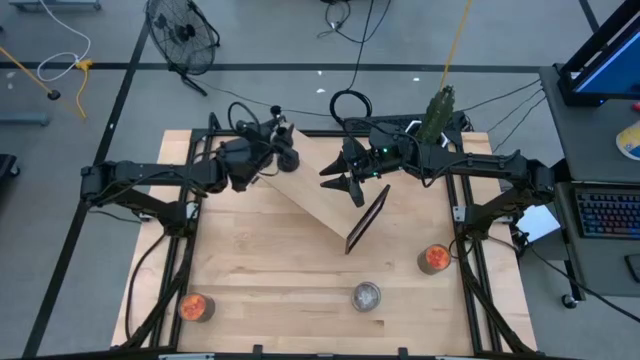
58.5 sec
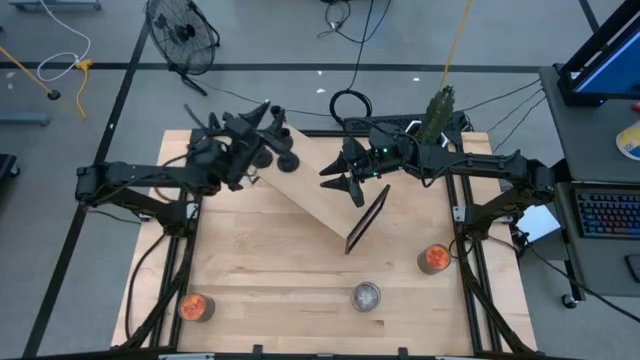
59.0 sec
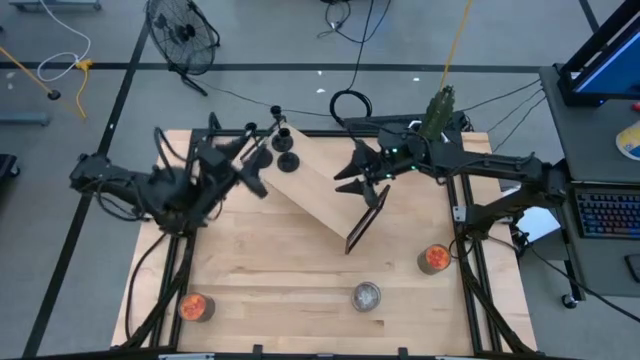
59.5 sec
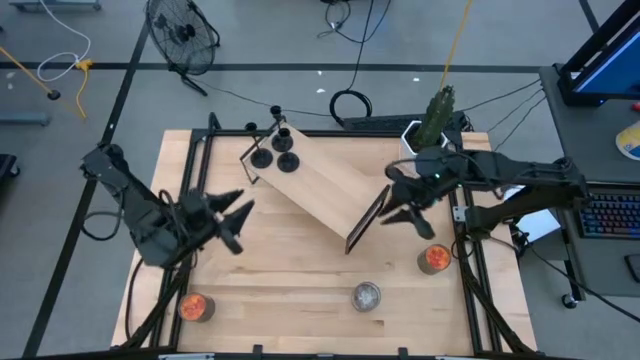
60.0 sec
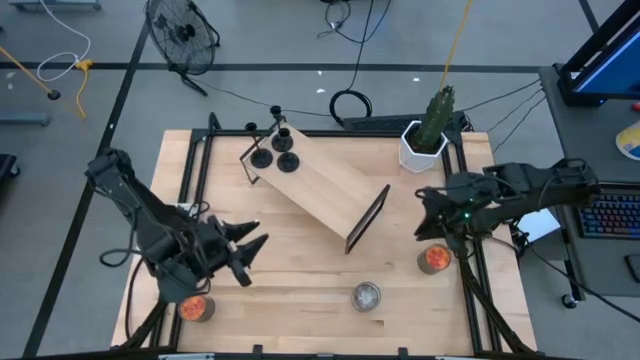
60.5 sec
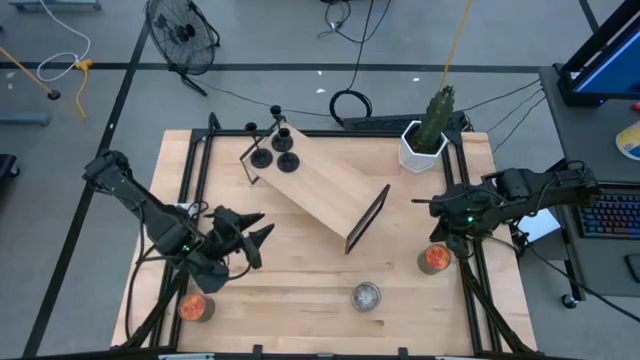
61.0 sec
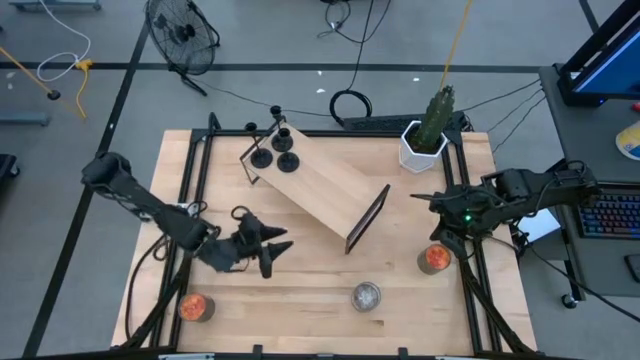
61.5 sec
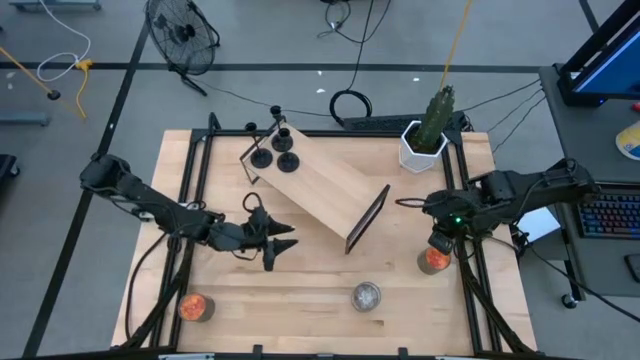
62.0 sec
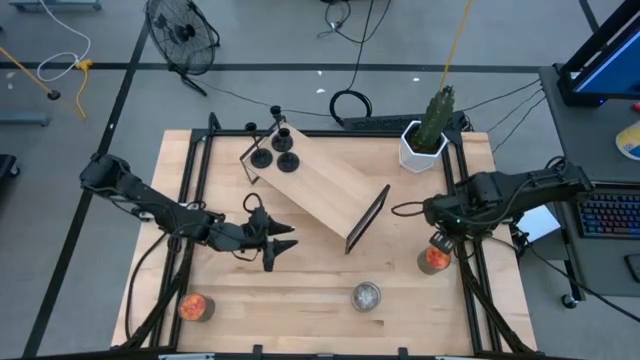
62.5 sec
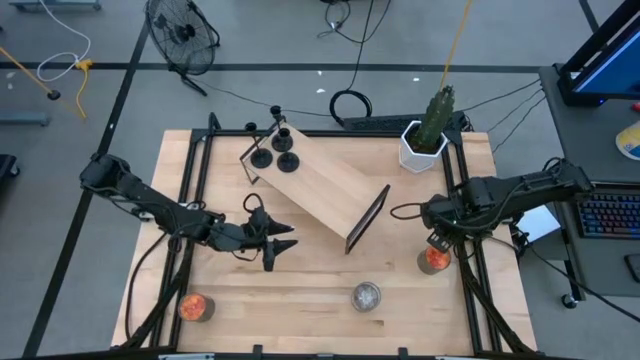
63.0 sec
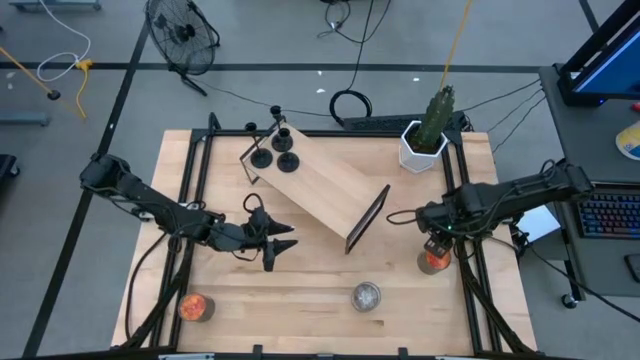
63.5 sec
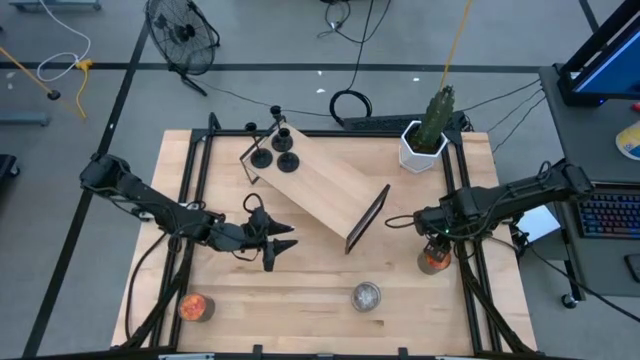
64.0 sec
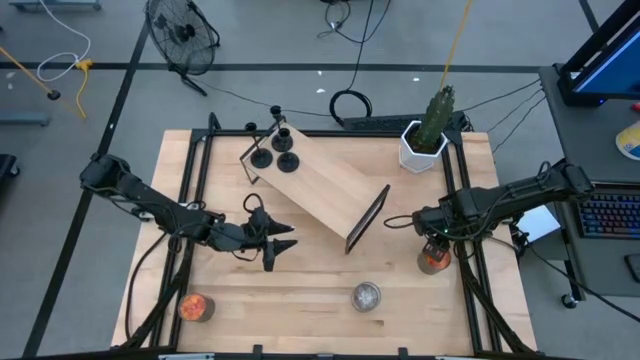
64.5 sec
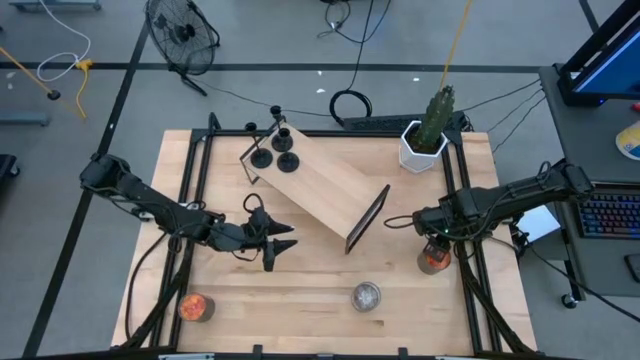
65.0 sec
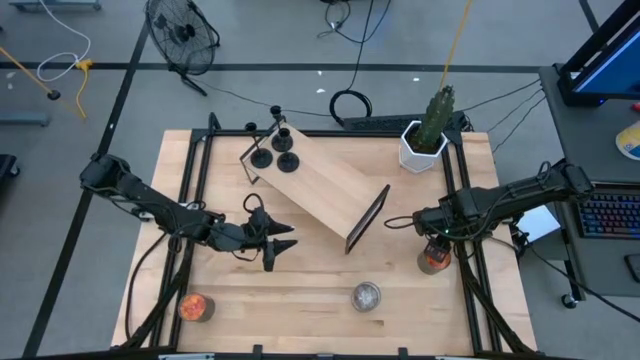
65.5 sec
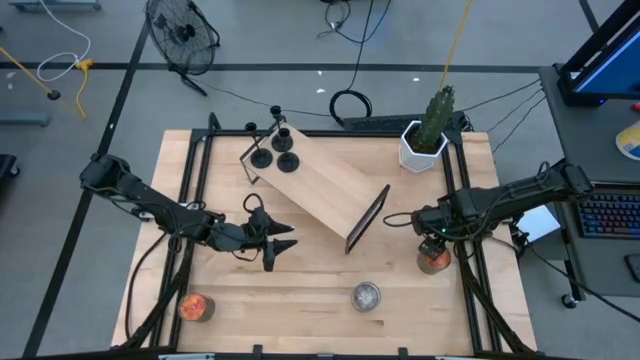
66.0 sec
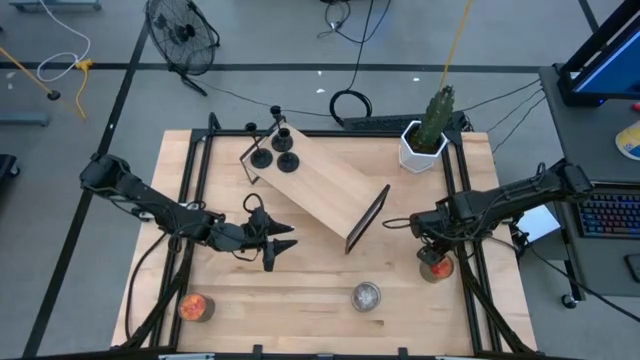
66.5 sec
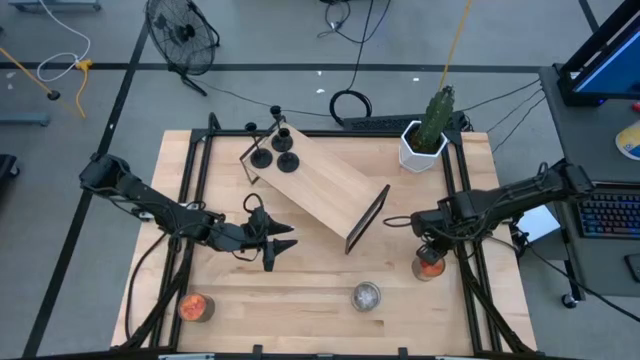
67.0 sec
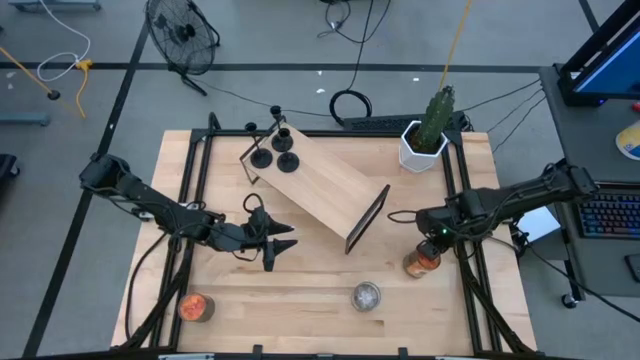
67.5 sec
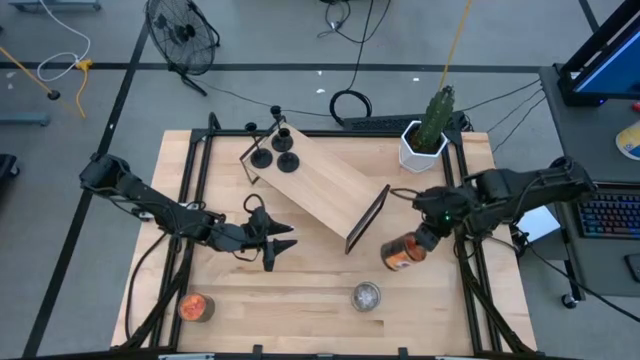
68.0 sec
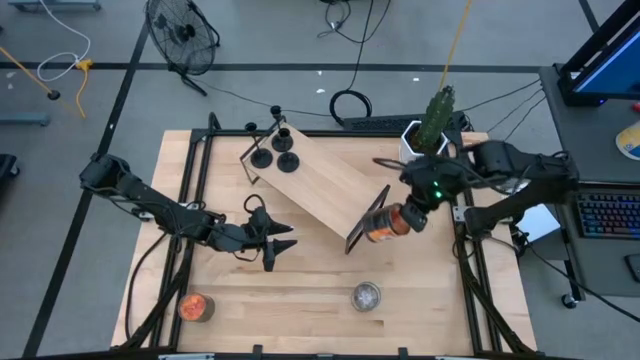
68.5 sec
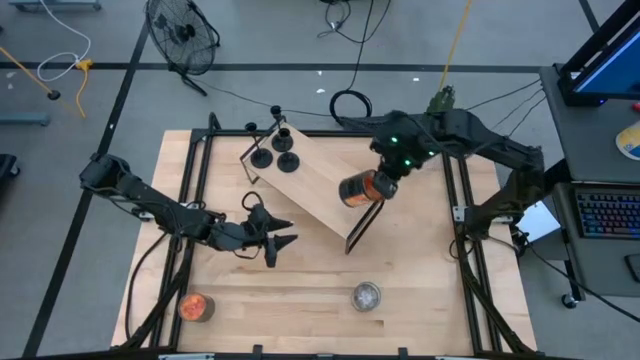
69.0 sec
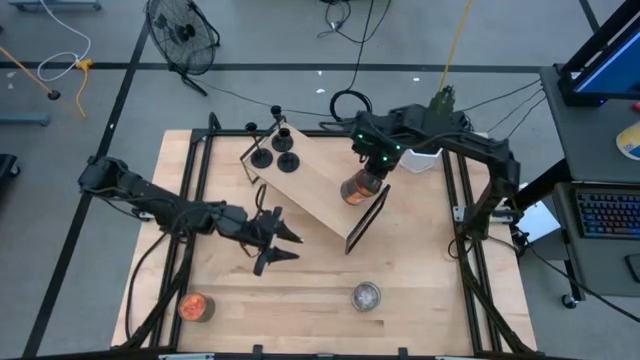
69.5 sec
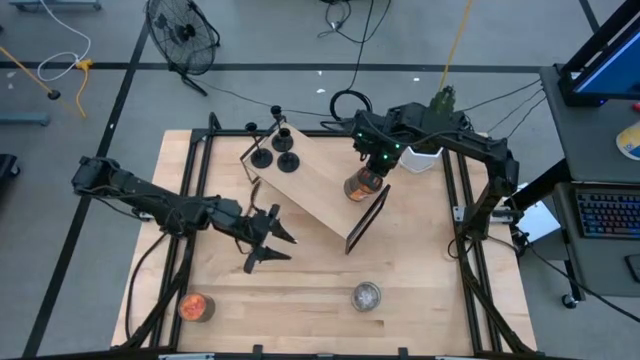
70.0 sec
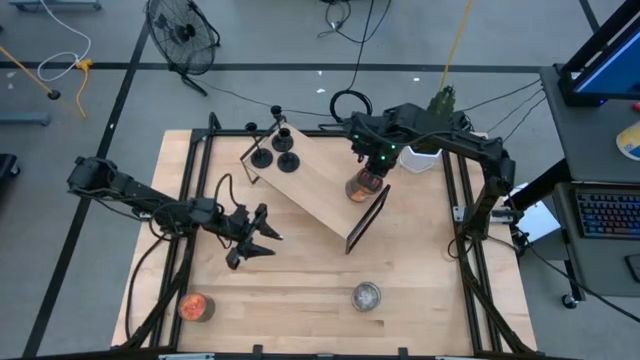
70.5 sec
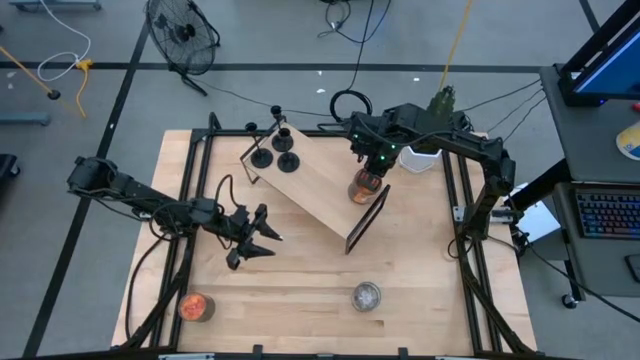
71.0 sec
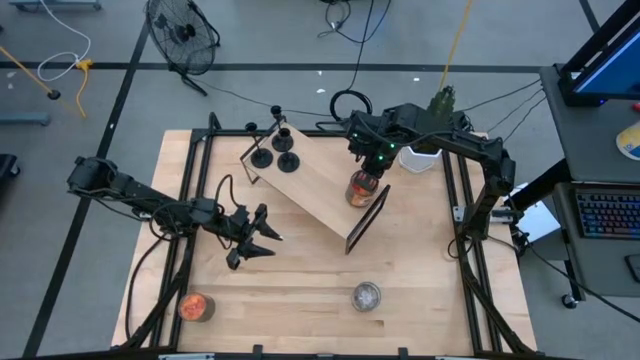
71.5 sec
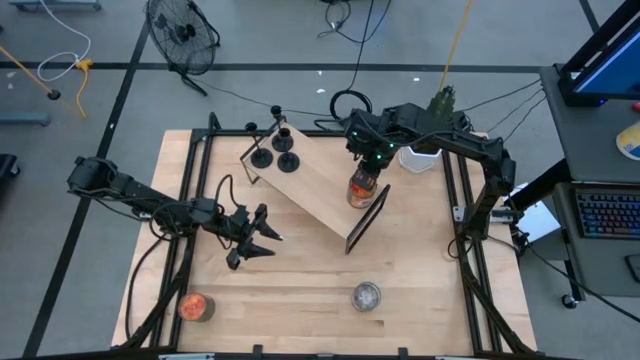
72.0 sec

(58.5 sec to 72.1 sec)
Task: Pick & Place candle stick holders
Put the right orange black candle tin on the shelf

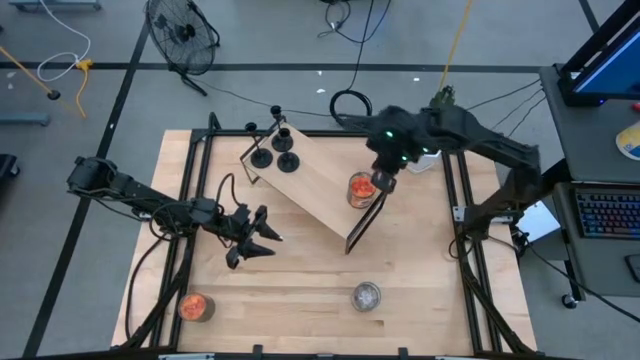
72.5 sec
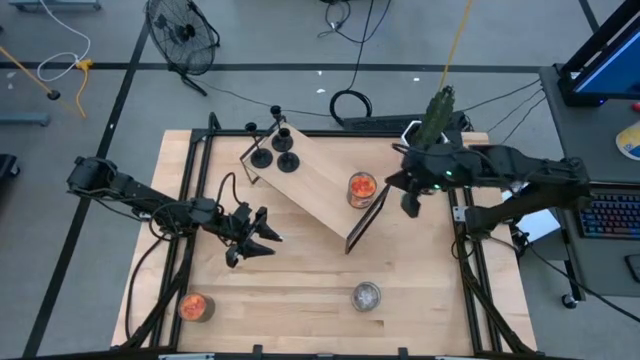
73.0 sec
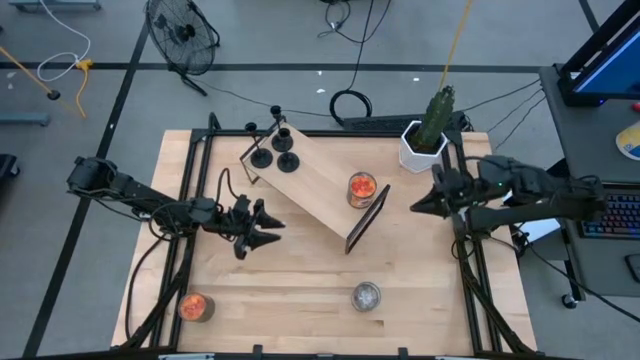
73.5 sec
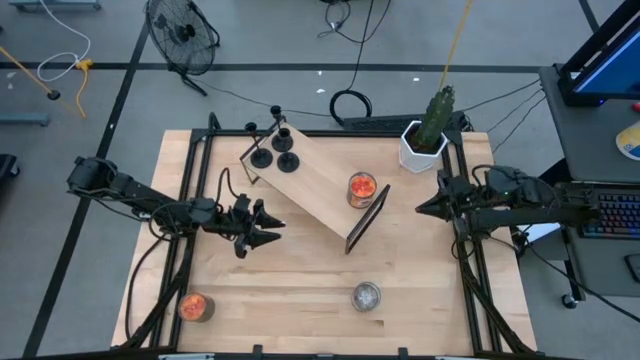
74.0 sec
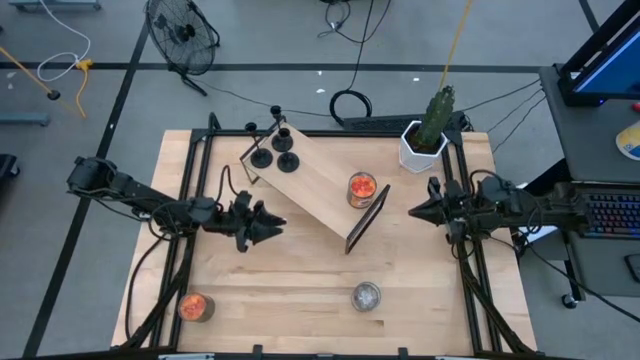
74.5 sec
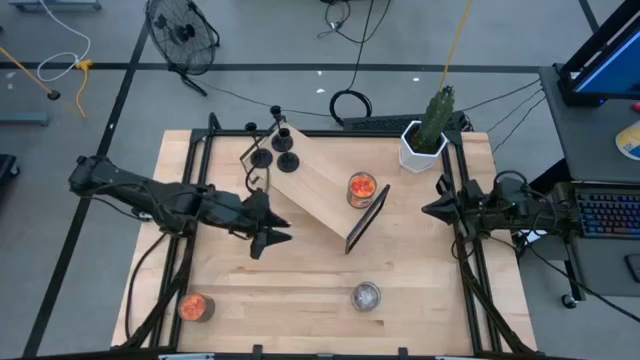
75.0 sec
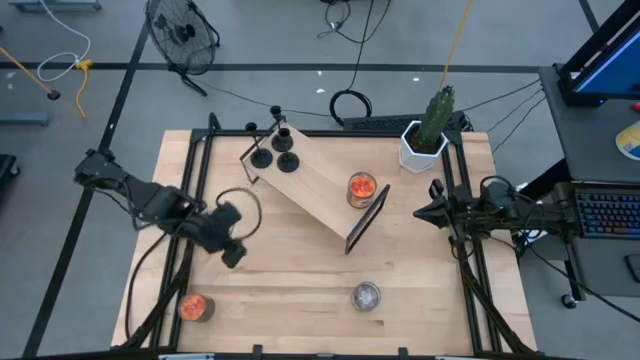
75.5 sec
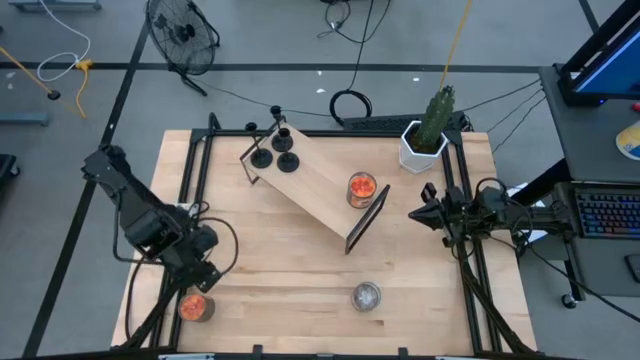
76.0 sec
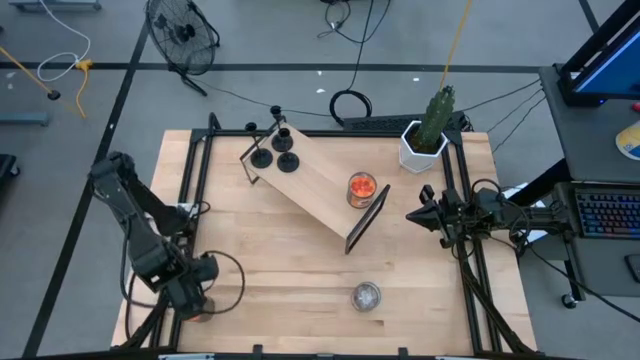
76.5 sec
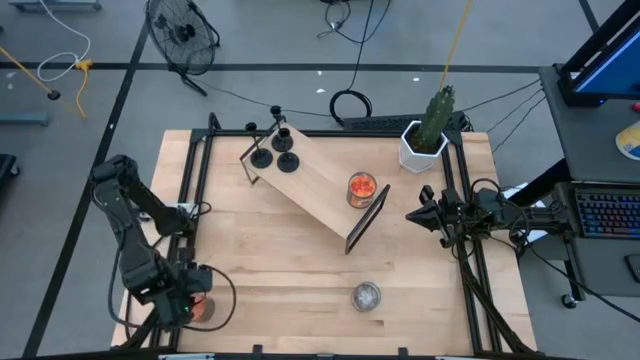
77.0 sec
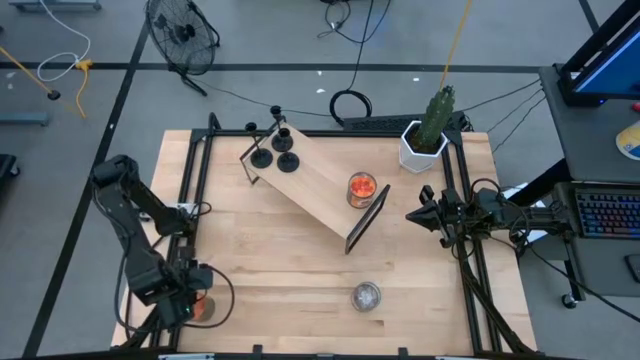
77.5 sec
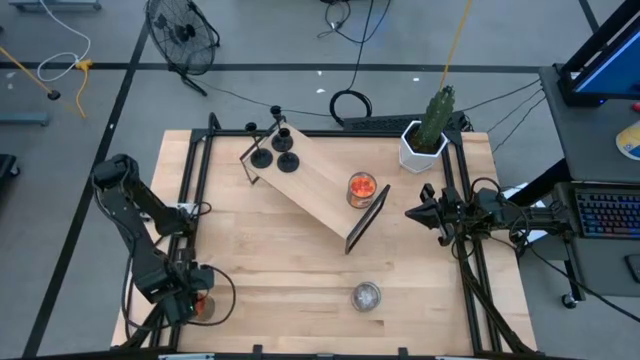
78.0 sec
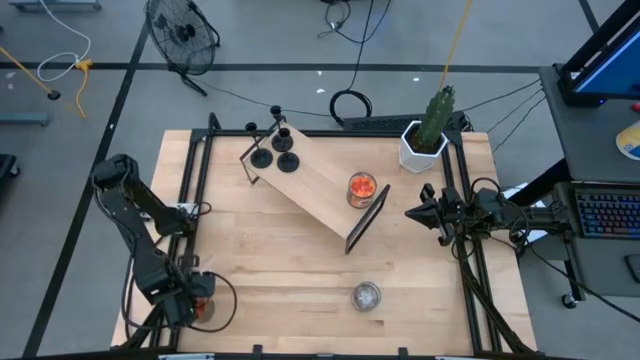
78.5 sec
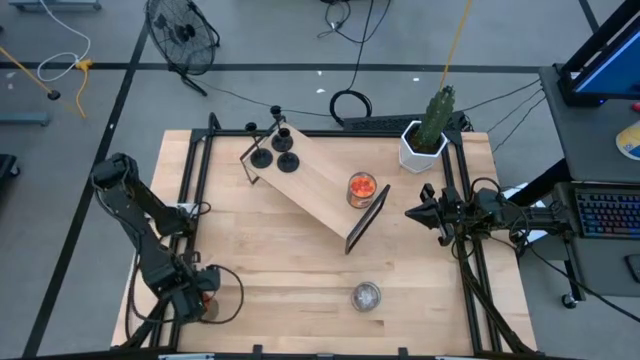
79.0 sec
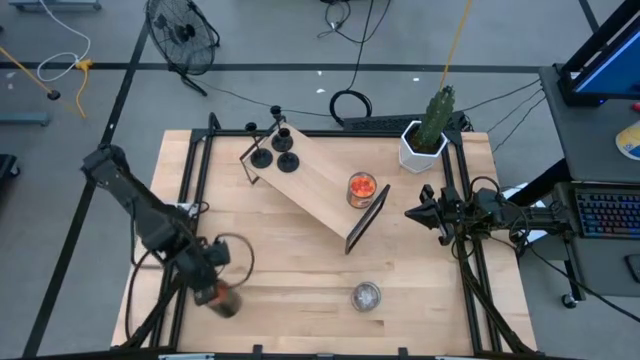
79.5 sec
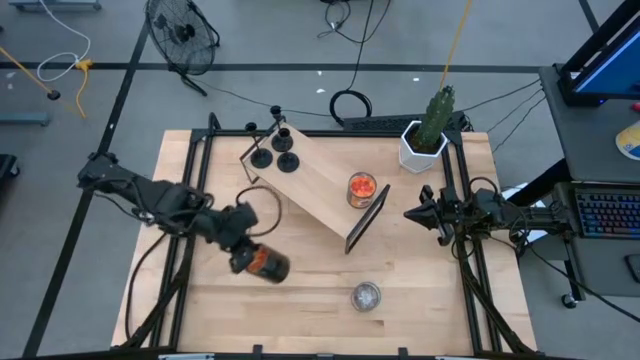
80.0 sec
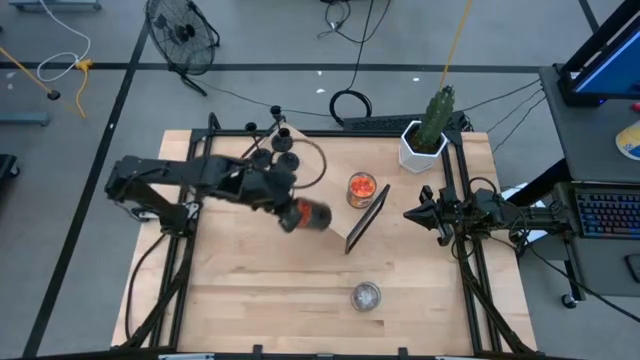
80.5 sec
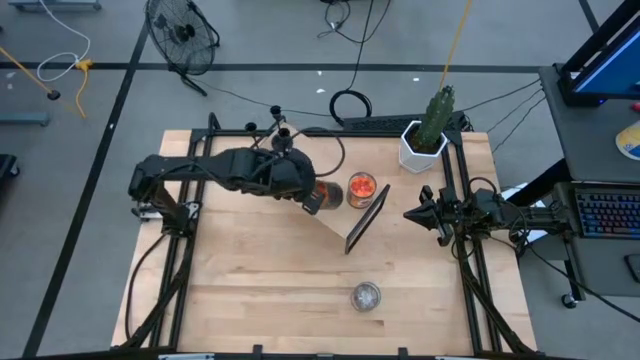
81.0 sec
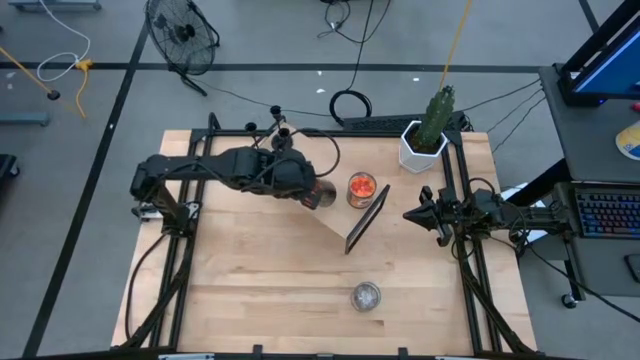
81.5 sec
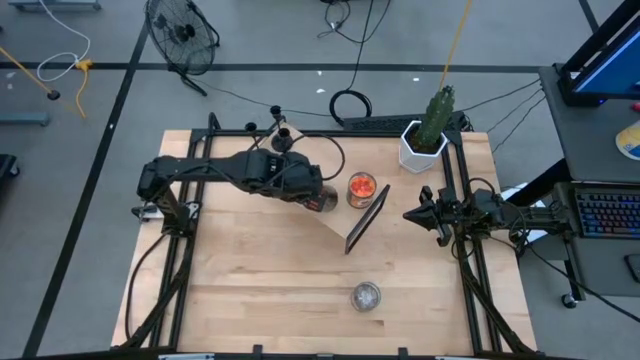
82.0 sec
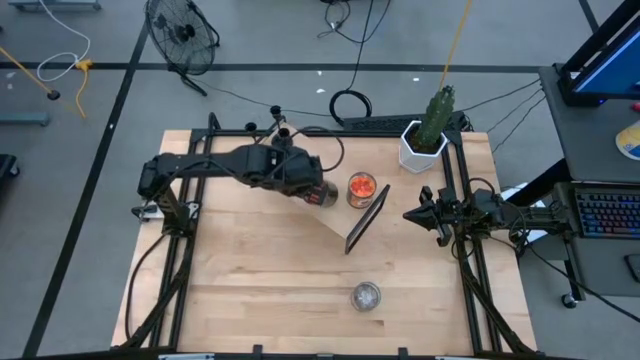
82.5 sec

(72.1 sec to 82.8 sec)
Put the orange black candle tin on the shelf
